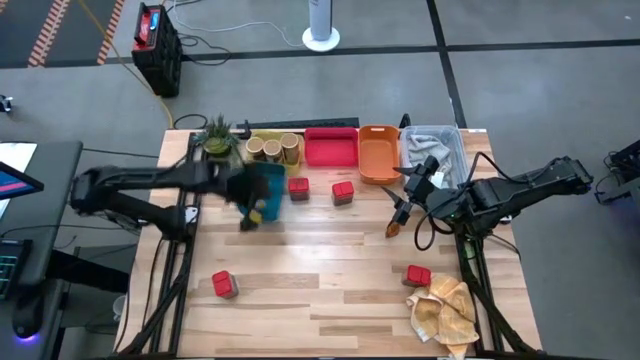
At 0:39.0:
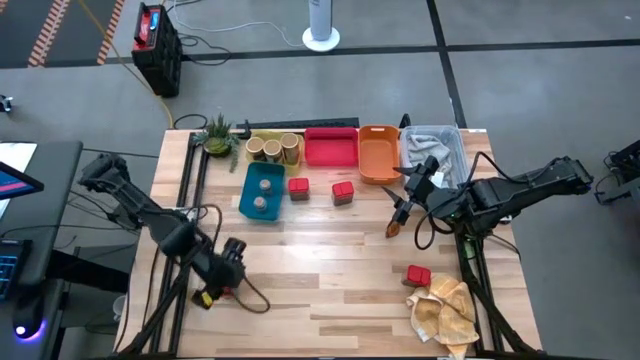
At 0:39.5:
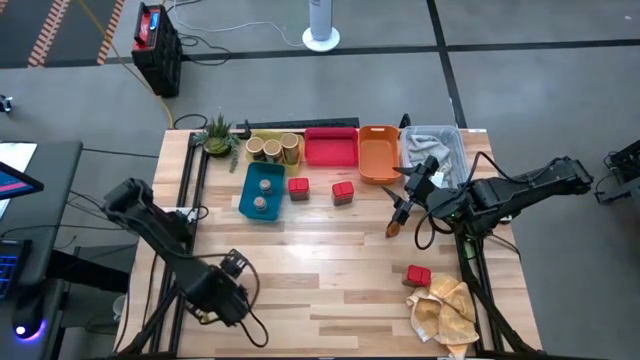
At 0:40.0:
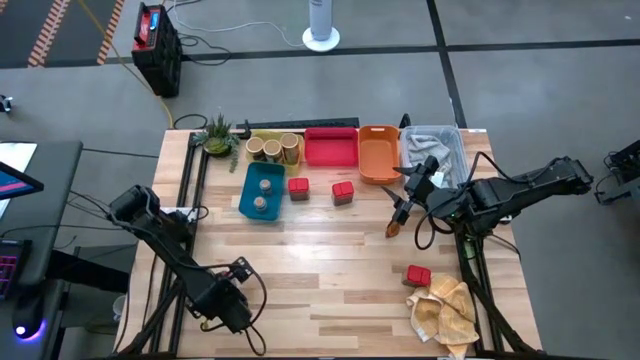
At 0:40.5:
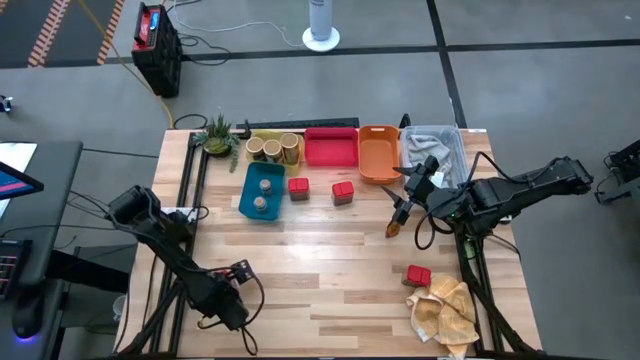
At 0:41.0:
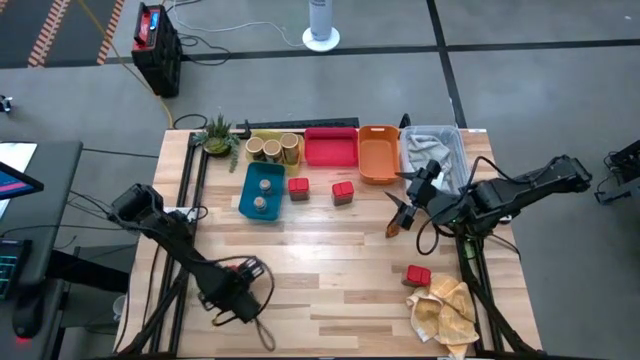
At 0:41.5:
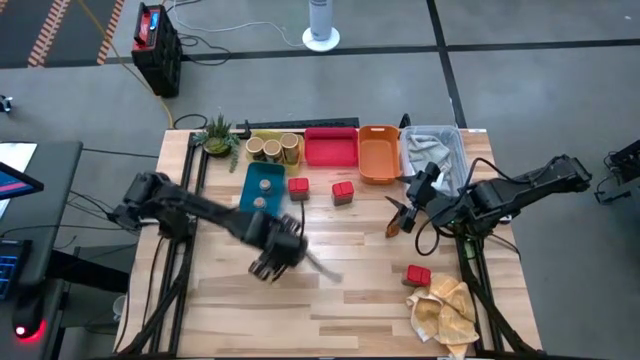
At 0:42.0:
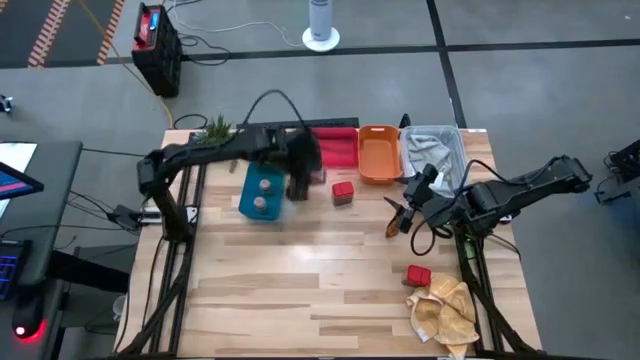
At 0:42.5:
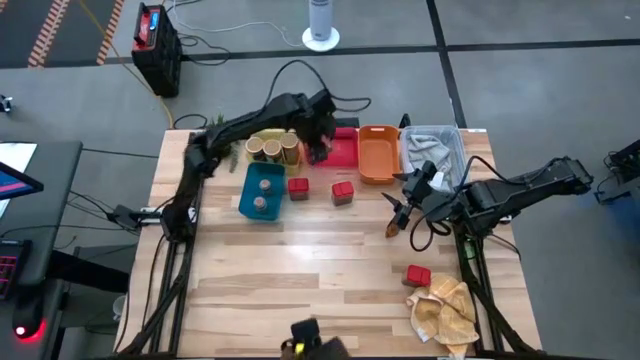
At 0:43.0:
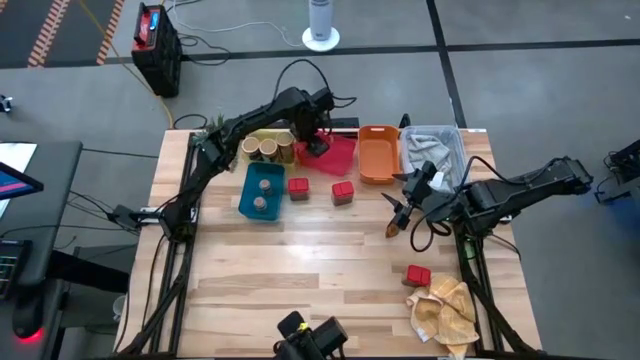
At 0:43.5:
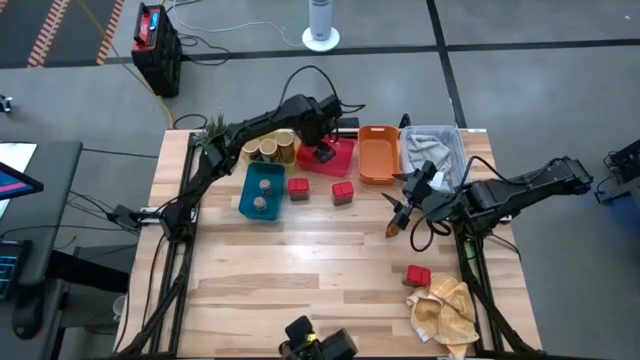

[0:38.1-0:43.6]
Task: Sort spices by type
Put the bottom left red seasoning can into the red bin

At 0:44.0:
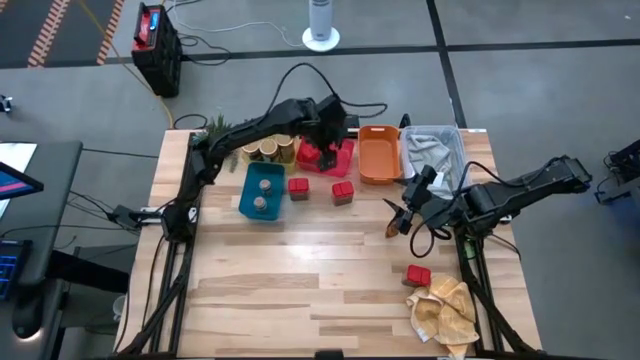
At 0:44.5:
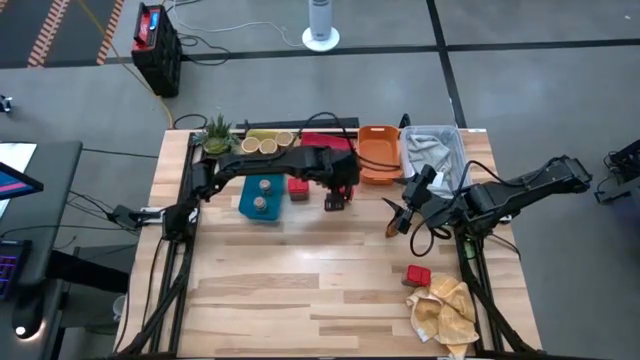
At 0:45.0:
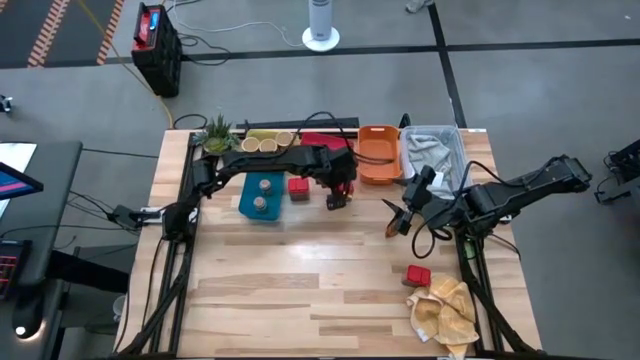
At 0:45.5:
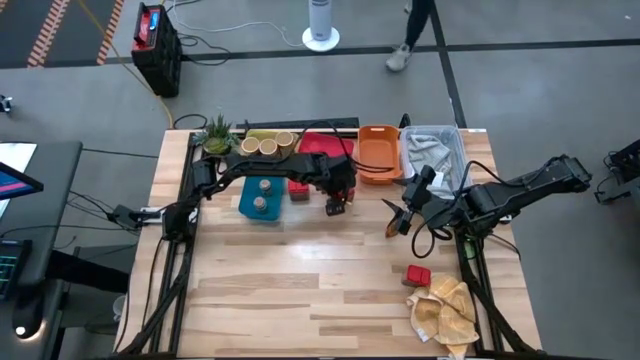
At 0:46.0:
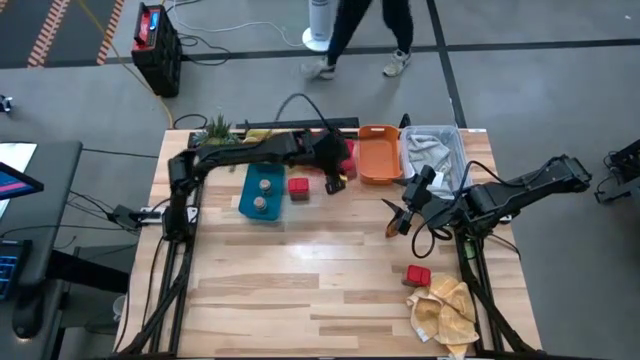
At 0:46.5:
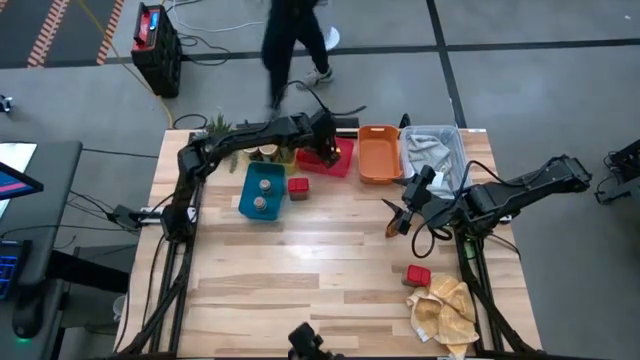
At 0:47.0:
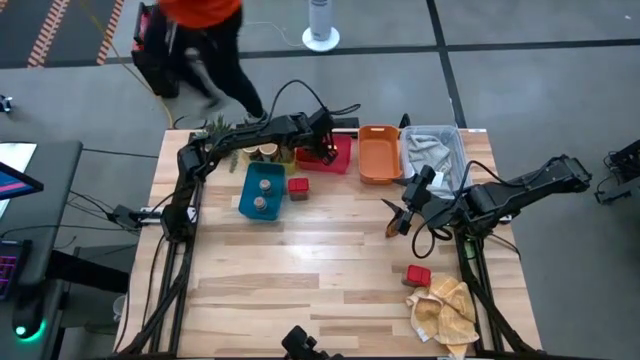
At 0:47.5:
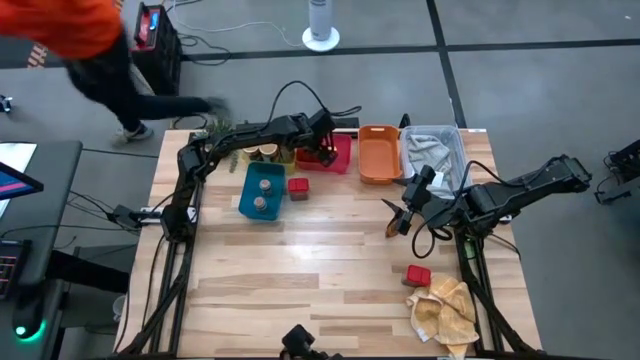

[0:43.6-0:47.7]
Put the top right red seasoning can into the red bin

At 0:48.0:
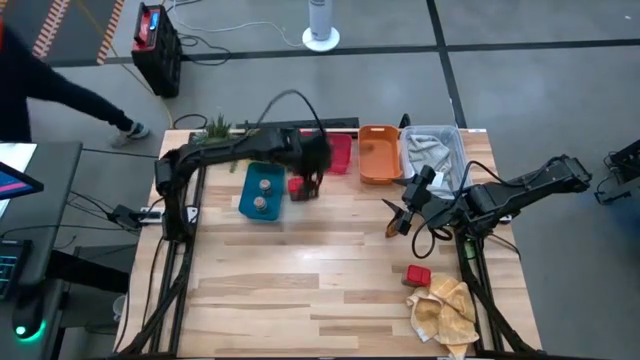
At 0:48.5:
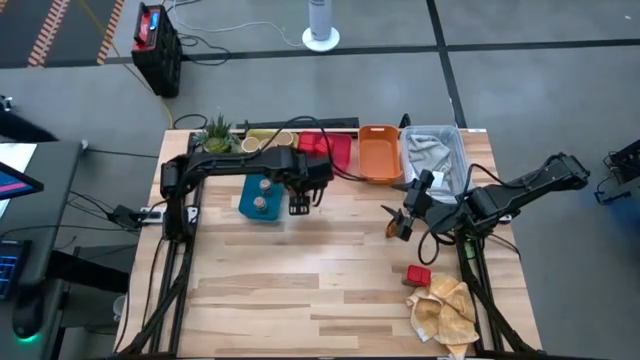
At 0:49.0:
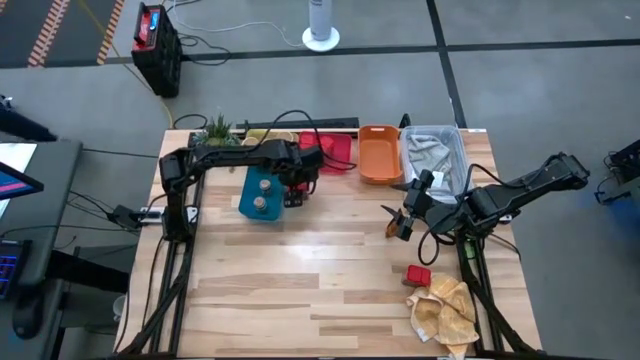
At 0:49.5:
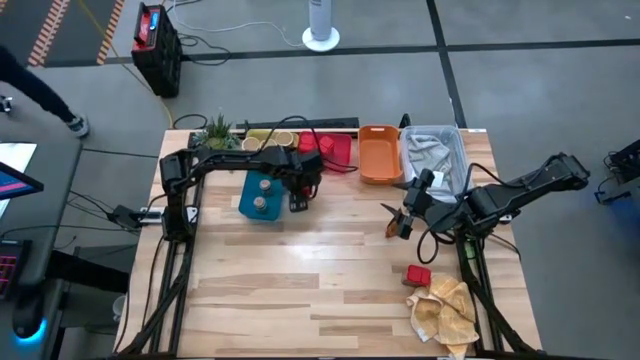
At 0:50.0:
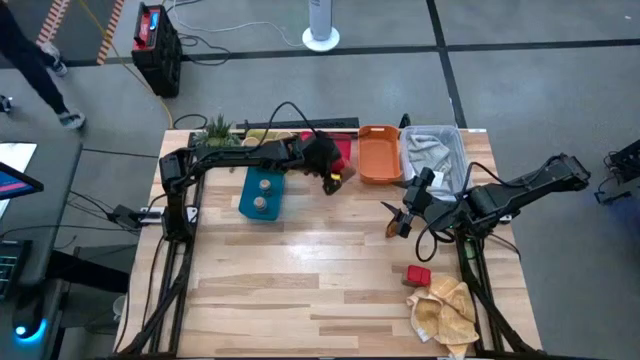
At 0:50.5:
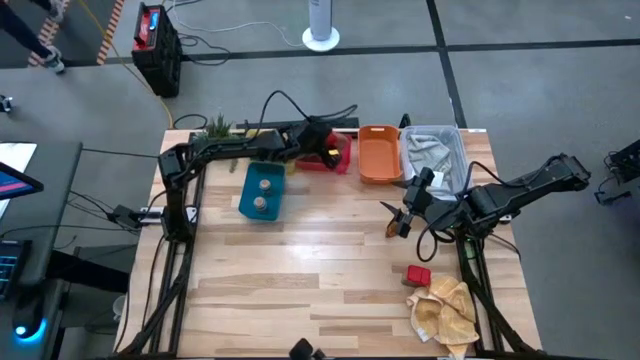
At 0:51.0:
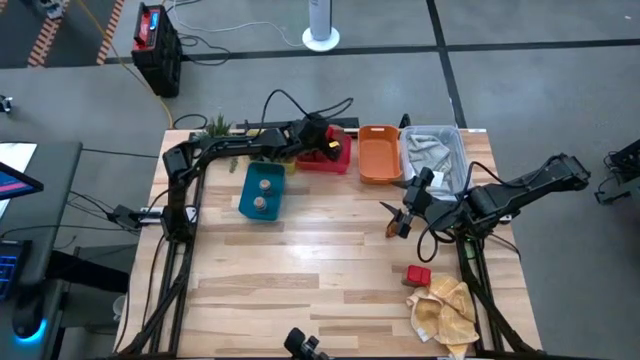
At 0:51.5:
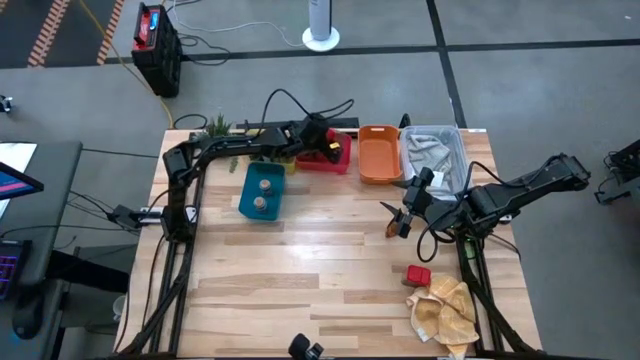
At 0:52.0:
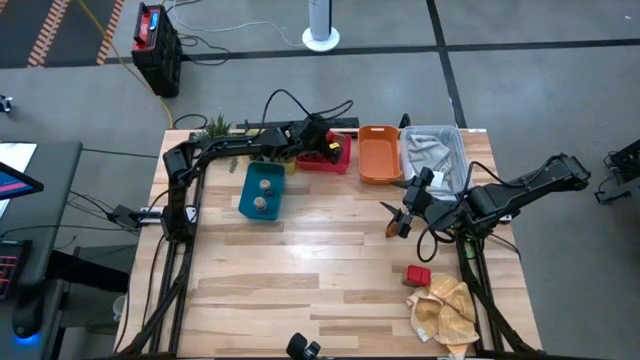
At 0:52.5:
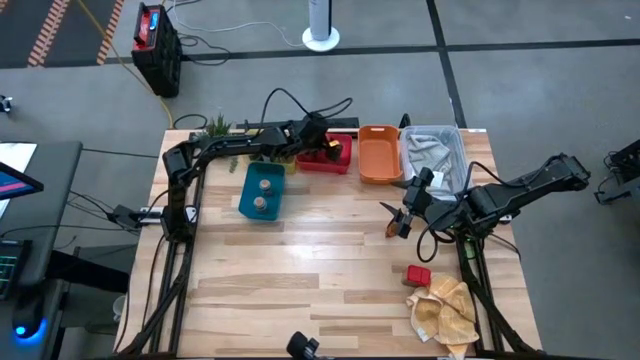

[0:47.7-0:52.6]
Put the top red seasoning can into the red bin

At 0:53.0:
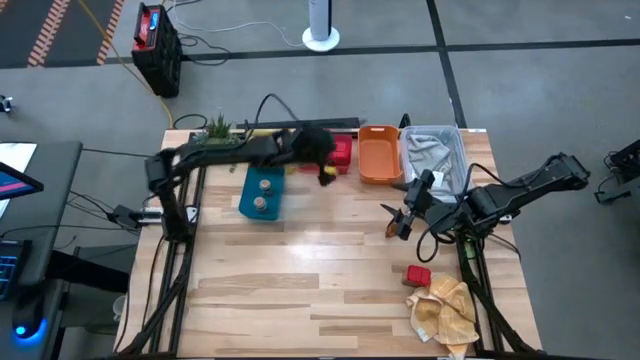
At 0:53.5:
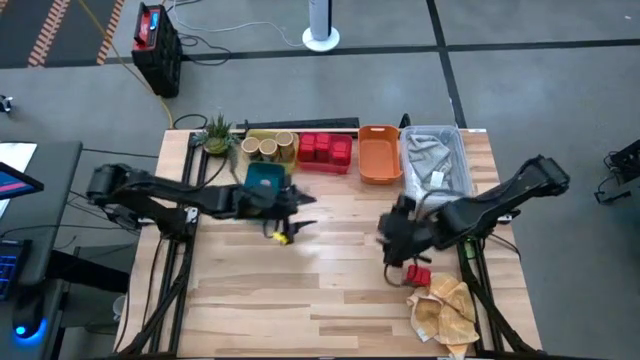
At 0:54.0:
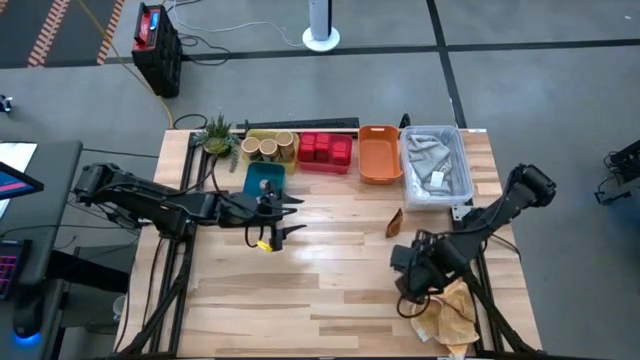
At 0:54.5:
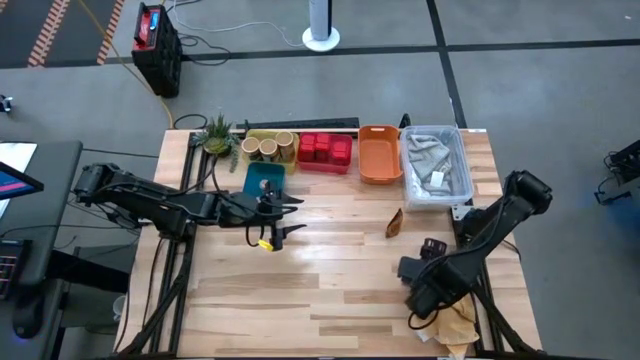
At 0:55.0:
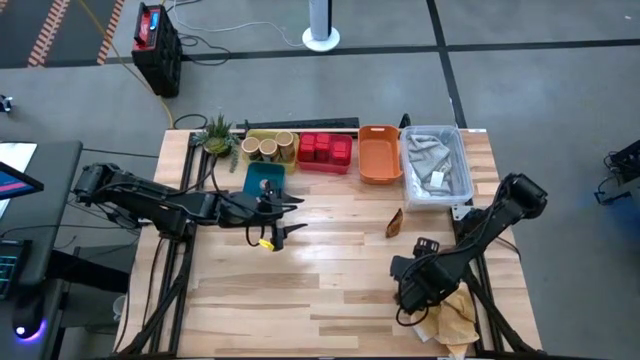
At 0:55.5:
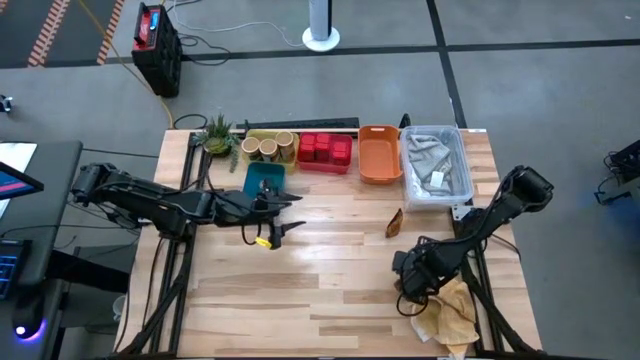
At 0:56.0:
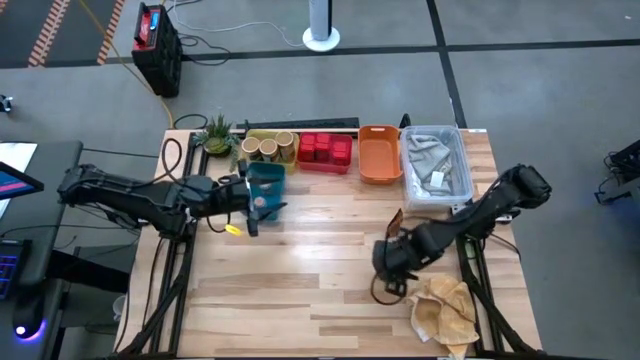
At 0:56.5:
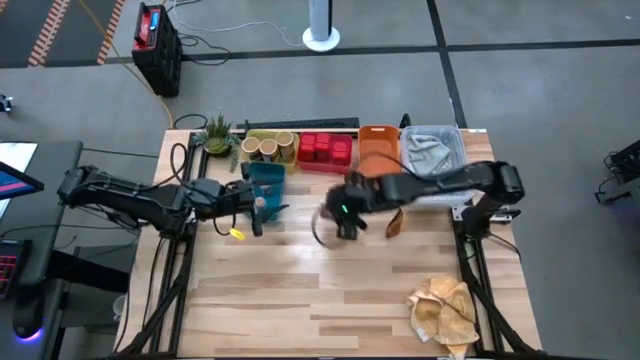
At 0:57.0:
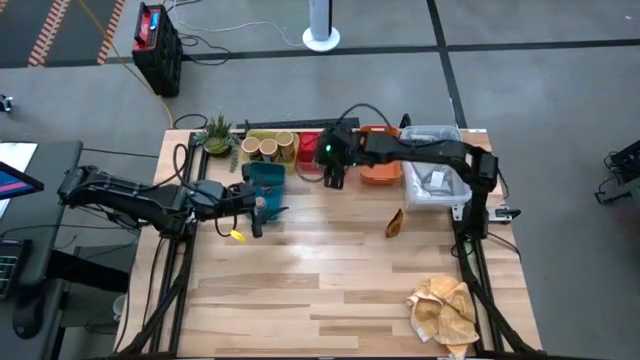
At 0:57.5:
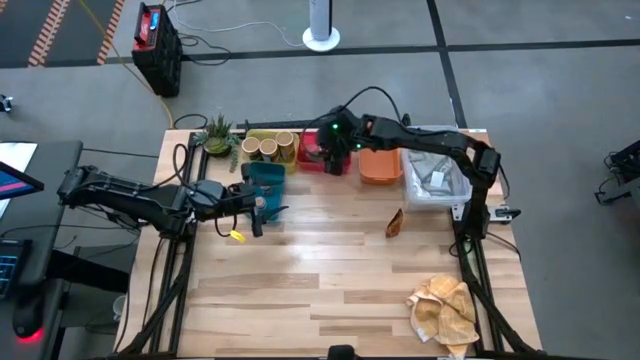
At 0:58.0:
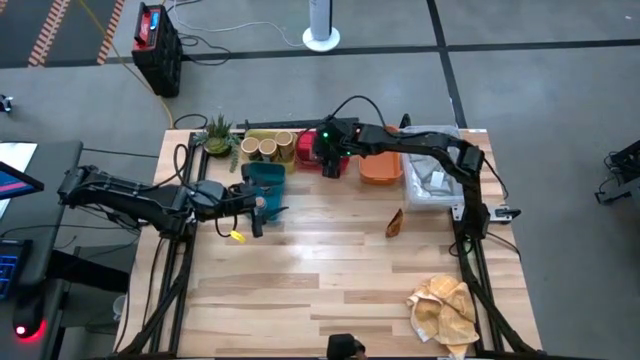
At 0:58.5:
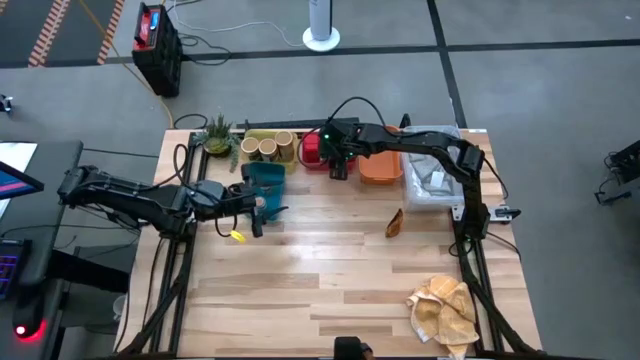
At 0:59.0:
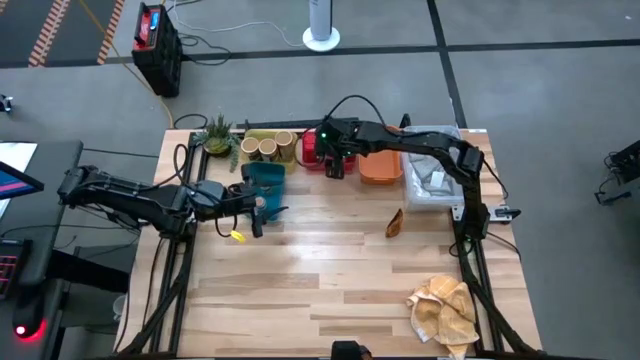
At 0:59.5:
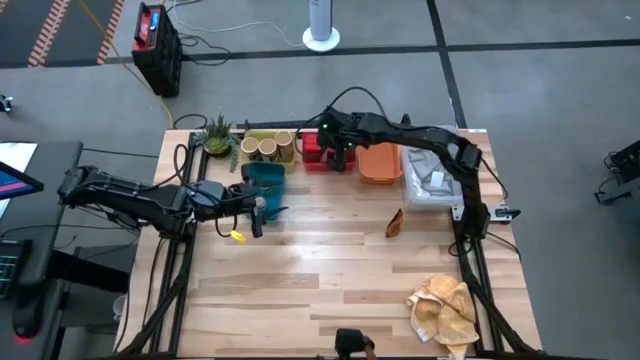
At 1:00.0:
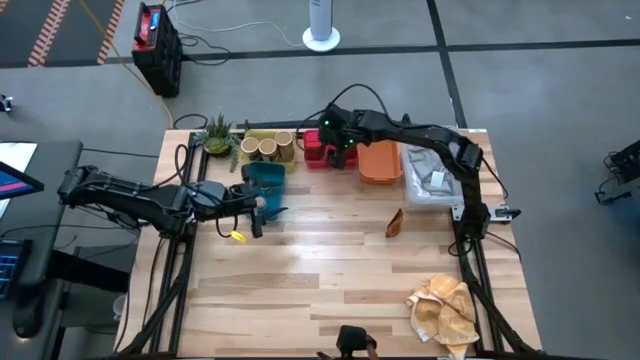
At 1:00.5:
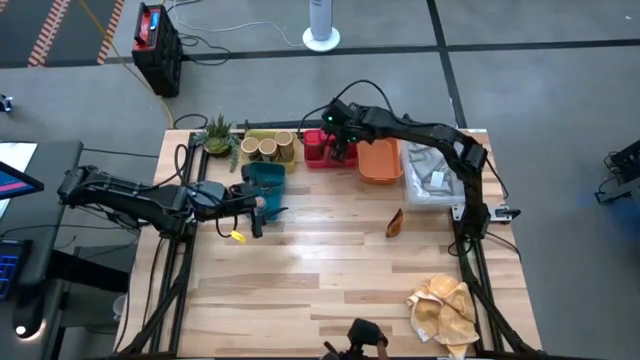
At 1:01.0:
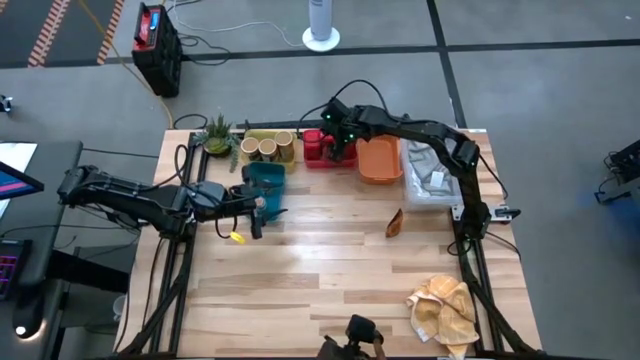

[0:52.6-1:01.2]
Put the red seasoning can into the red bin
